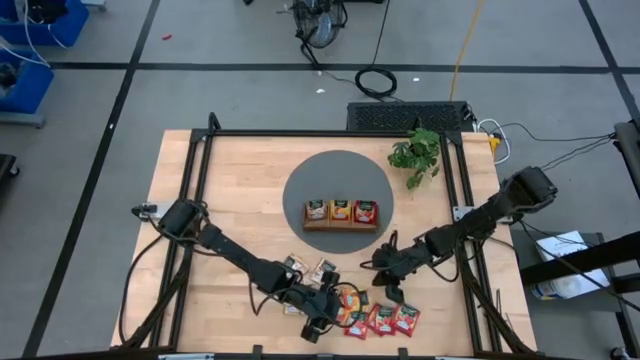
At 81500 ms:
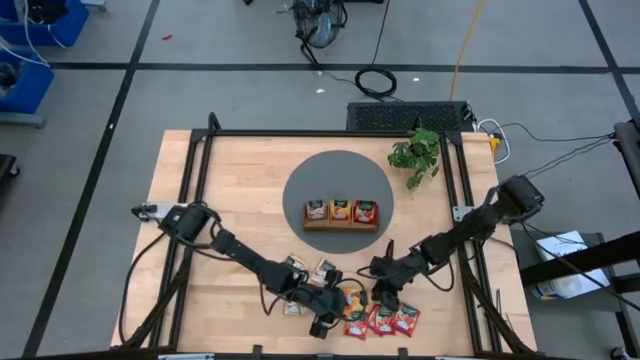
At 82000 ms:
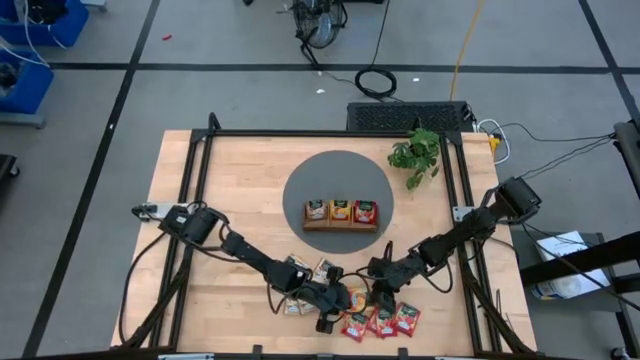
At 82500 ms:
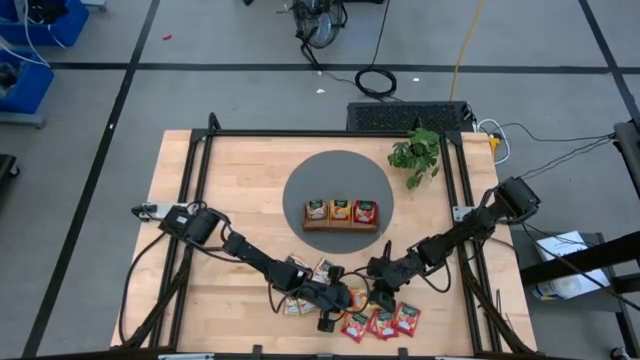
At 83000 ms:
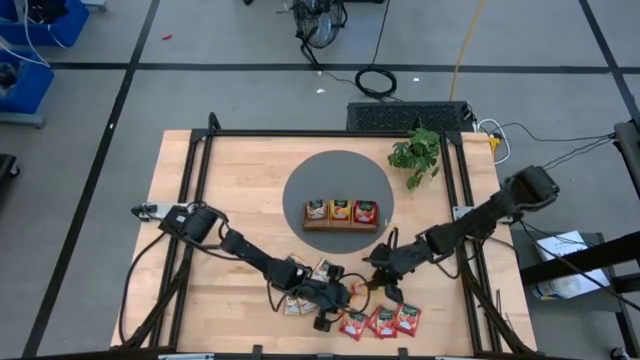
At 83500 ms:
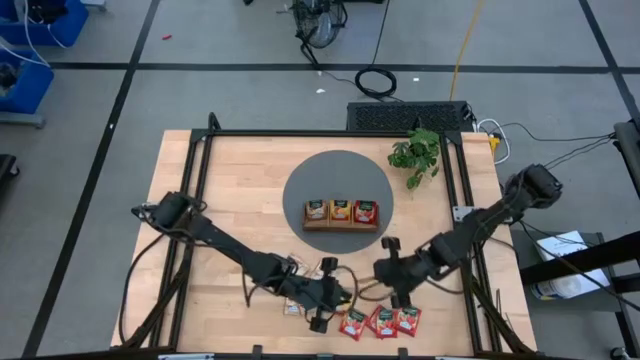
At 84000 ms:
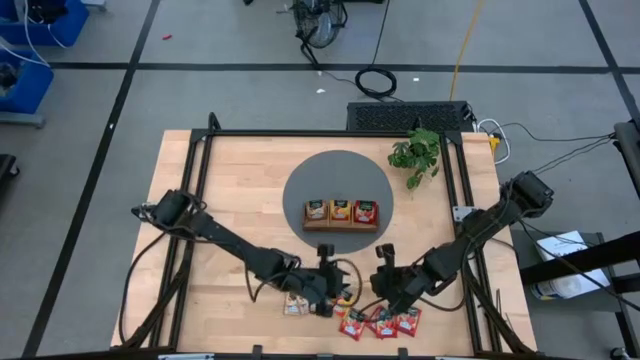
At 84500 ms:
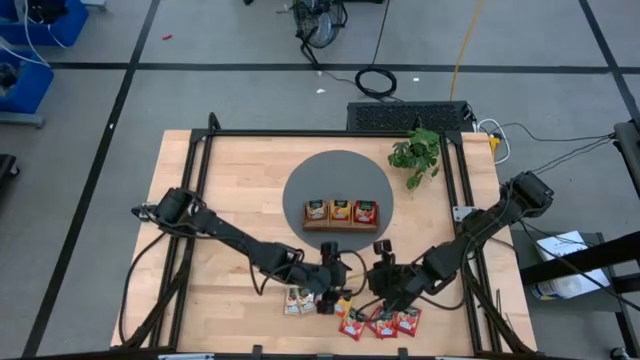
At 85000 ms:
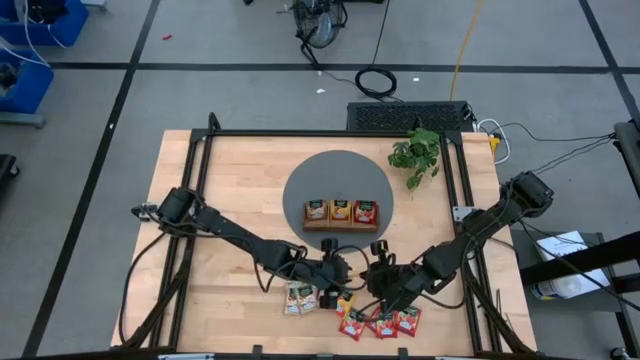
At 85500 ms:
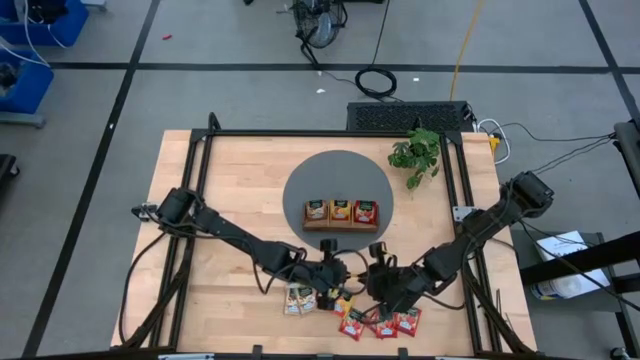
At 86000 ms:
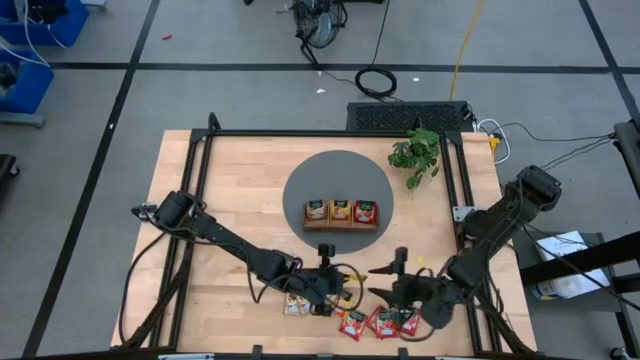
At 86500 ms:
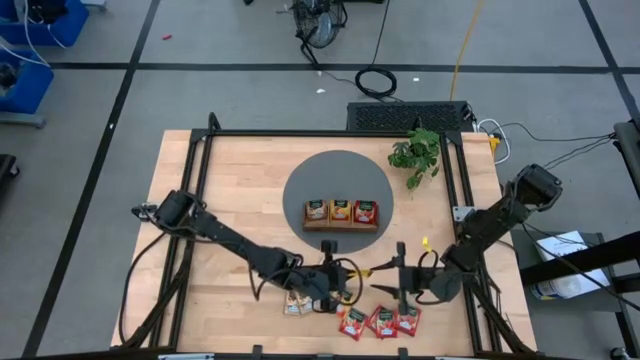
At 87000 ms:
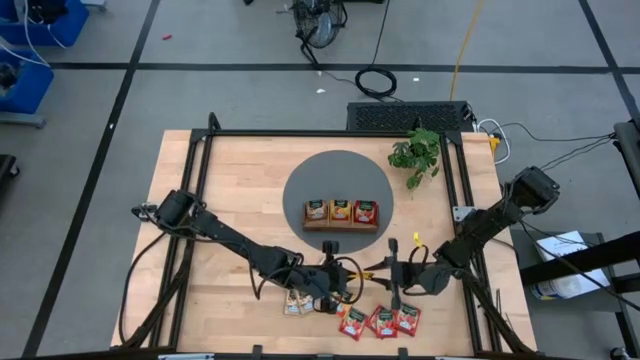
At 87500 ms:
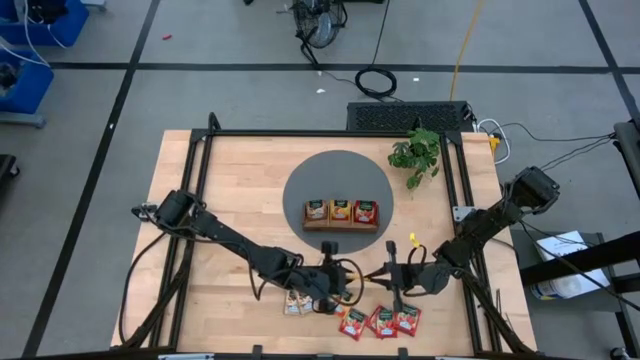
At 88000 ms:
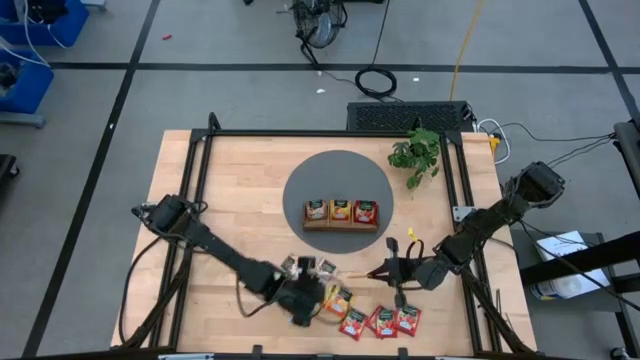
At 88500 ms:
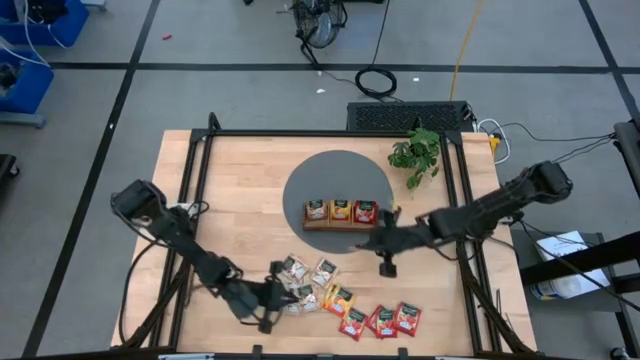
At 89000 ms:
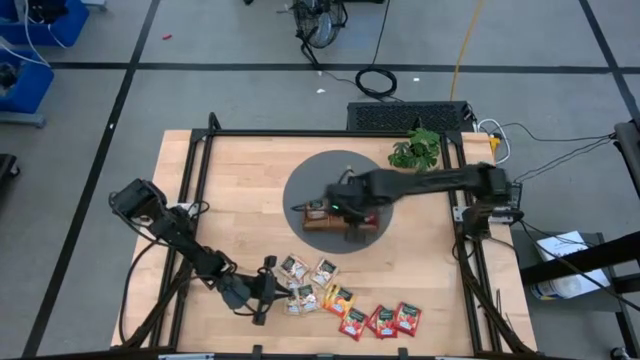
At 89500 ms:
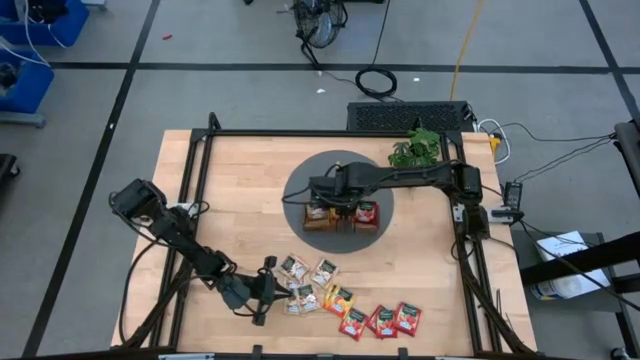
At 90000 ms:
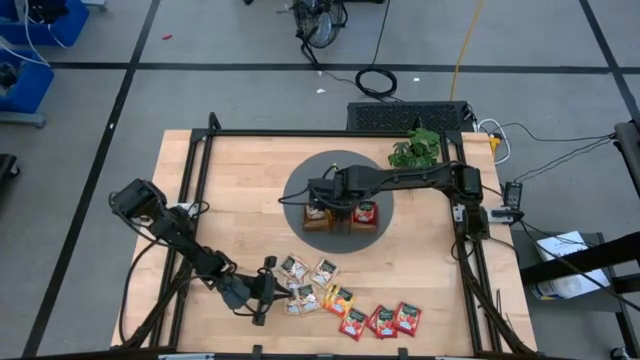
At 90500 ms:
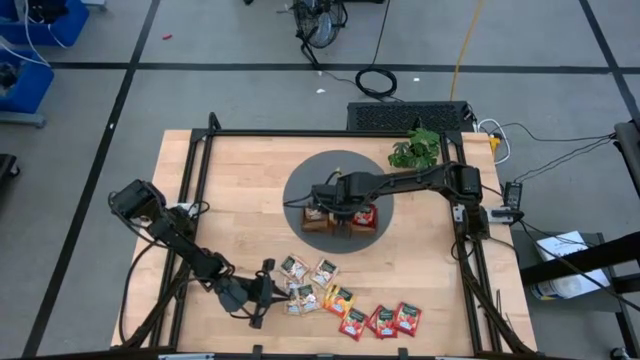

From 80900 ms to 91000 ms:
Task: Pick & Place Tea
Put the top orange tea bag into the middle slot of the wooden organizer

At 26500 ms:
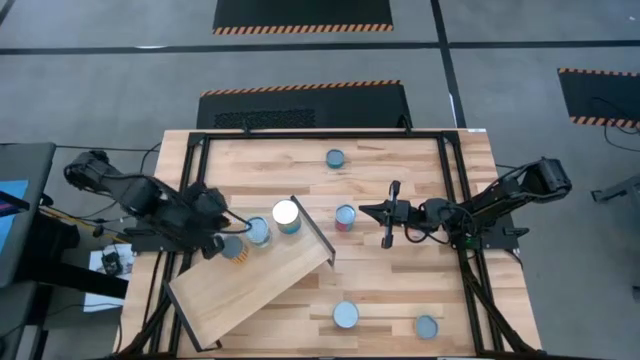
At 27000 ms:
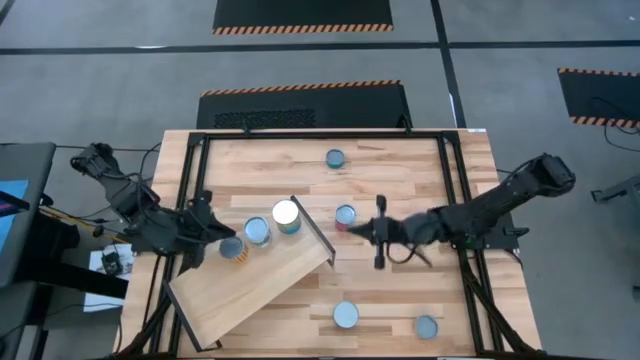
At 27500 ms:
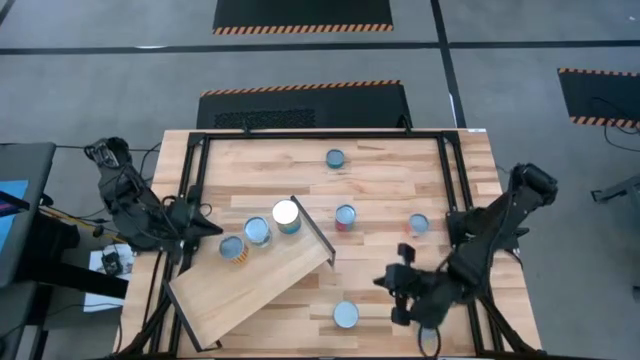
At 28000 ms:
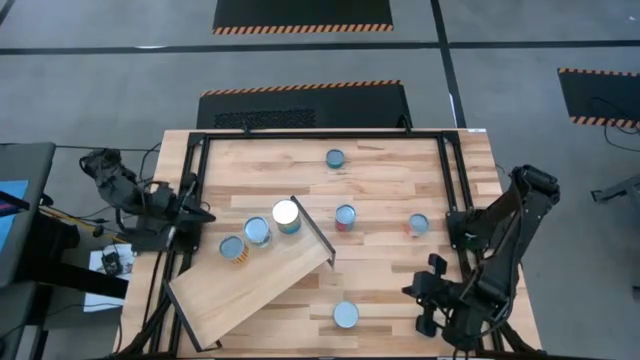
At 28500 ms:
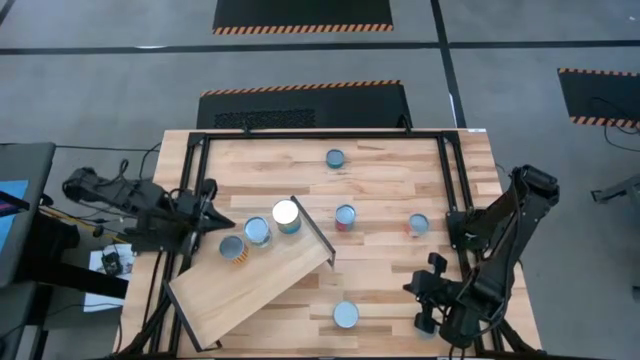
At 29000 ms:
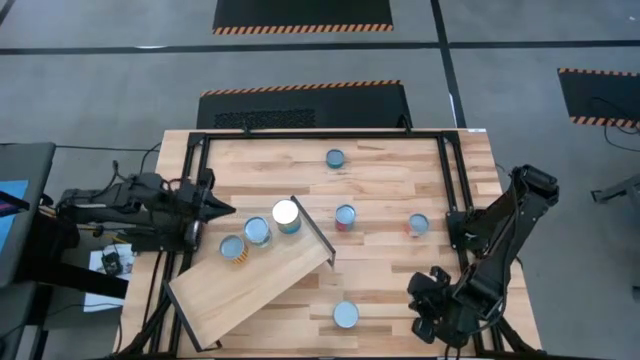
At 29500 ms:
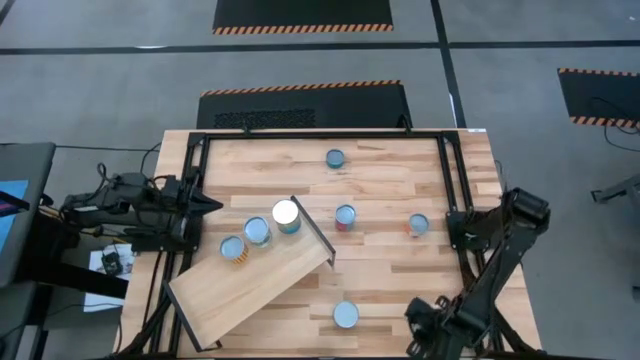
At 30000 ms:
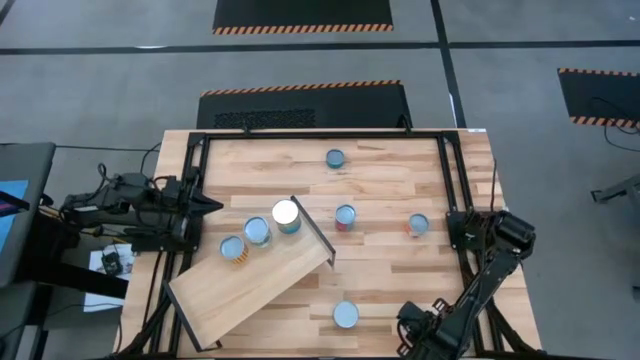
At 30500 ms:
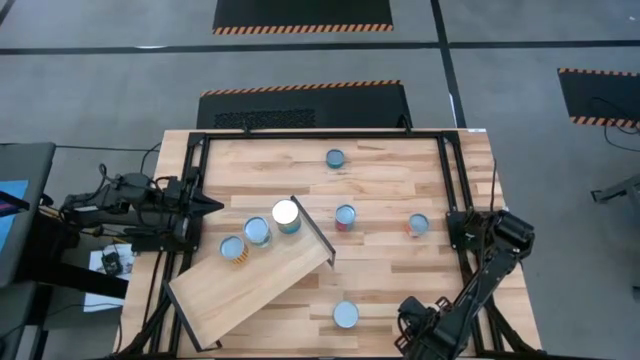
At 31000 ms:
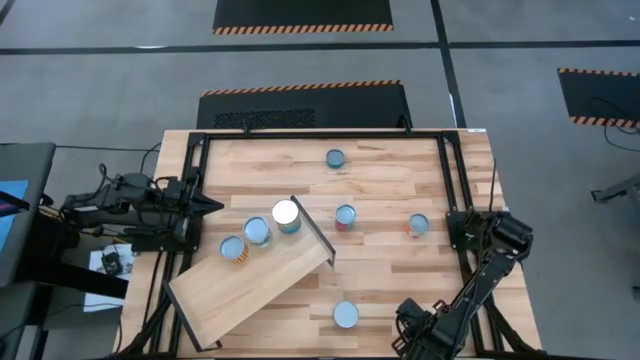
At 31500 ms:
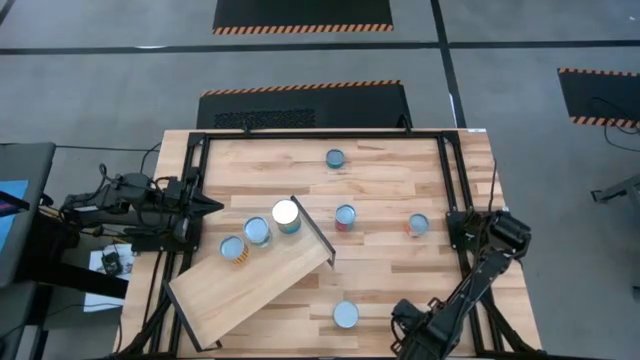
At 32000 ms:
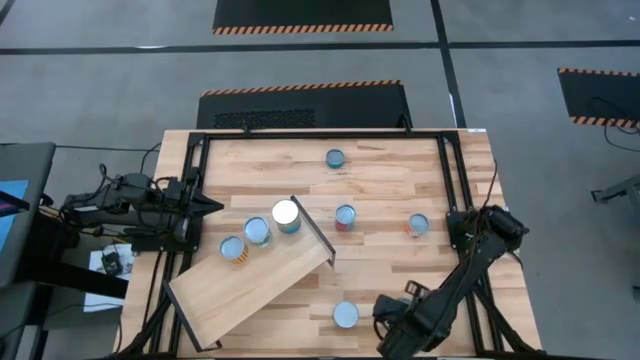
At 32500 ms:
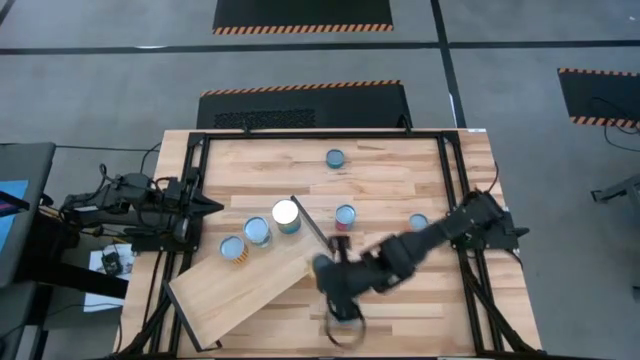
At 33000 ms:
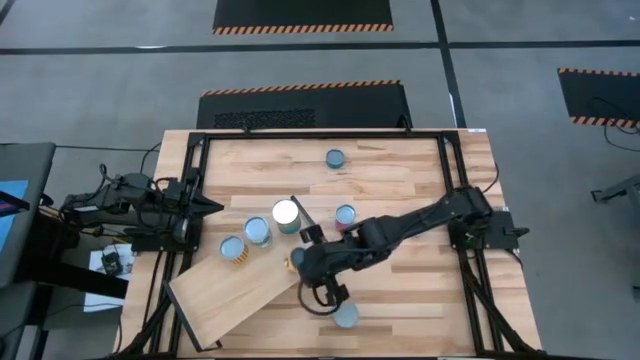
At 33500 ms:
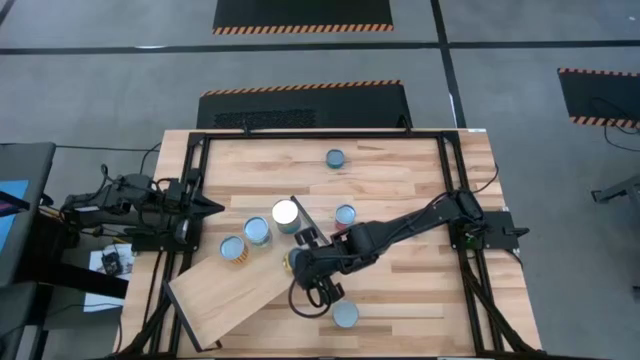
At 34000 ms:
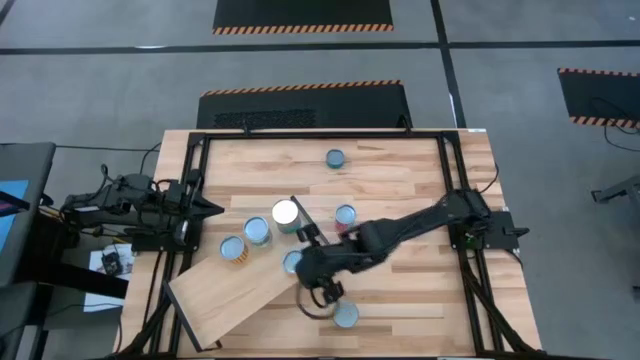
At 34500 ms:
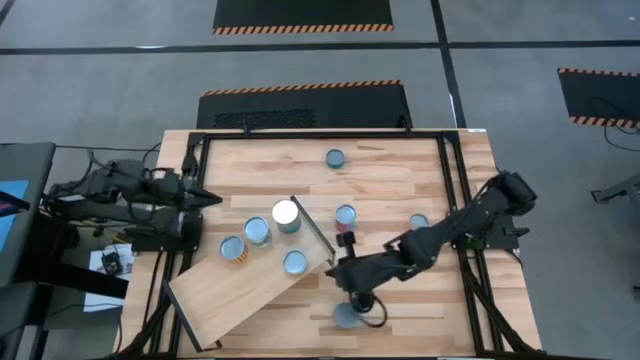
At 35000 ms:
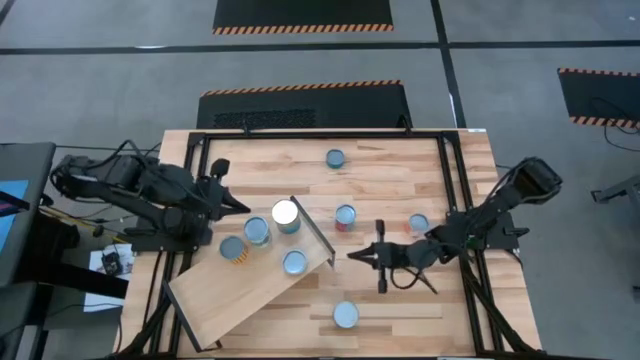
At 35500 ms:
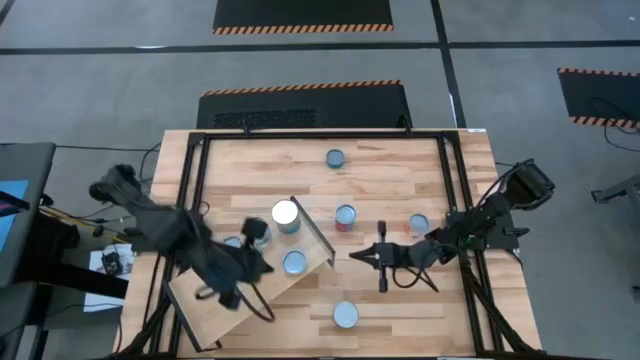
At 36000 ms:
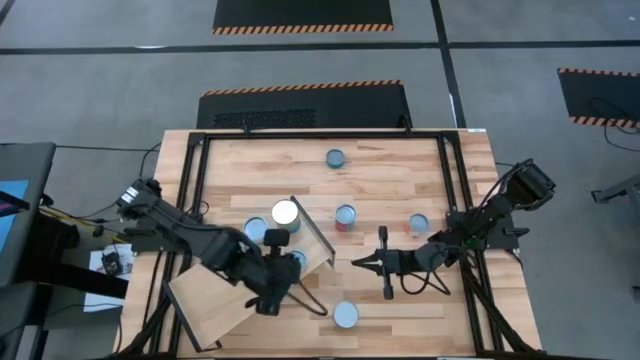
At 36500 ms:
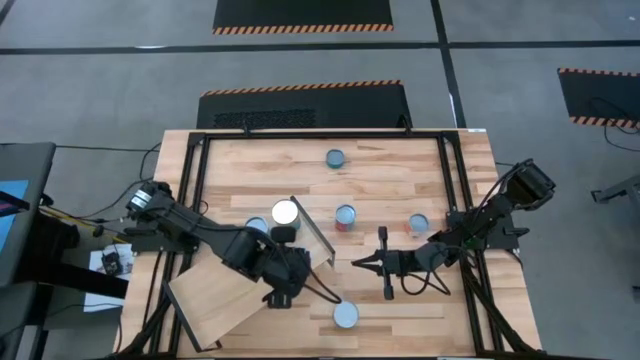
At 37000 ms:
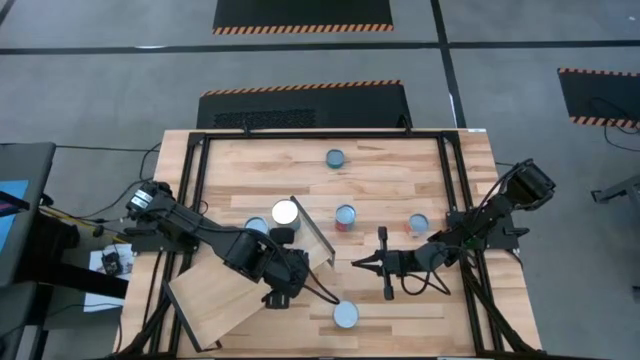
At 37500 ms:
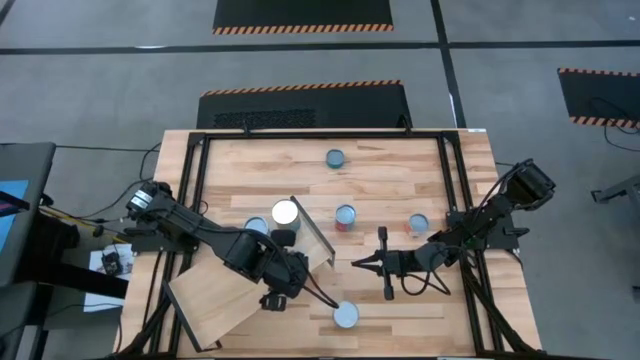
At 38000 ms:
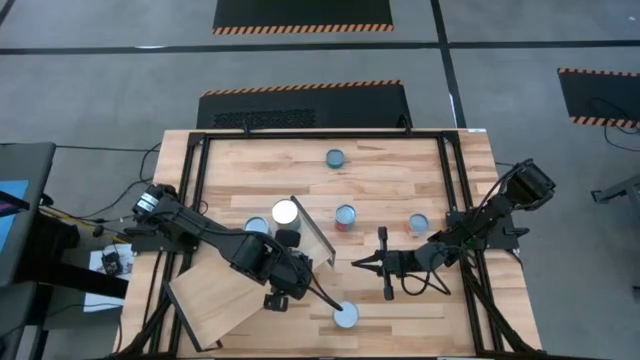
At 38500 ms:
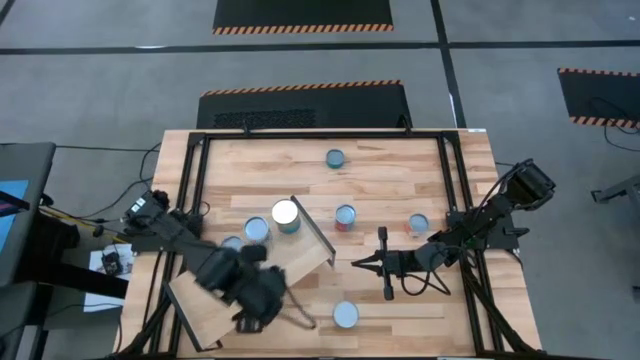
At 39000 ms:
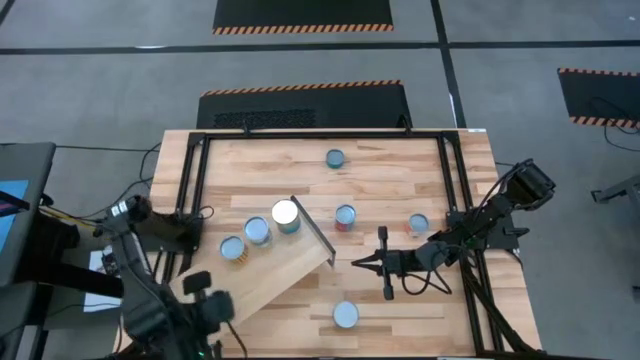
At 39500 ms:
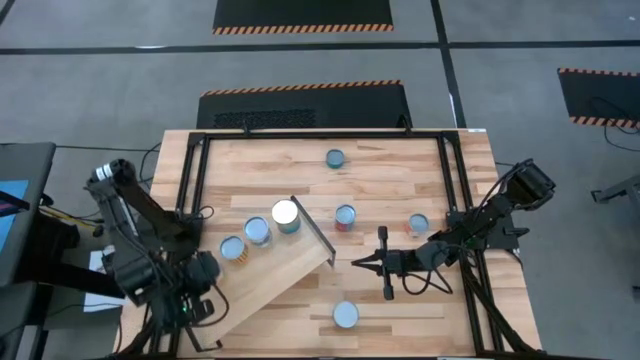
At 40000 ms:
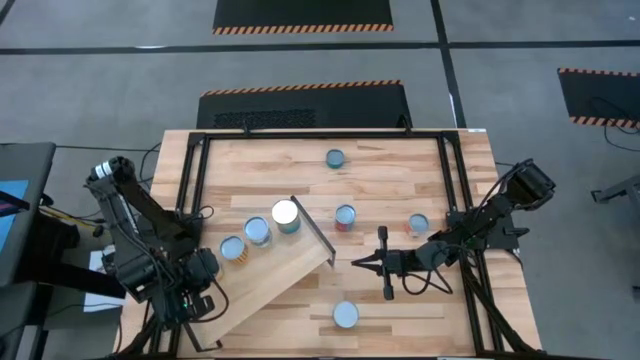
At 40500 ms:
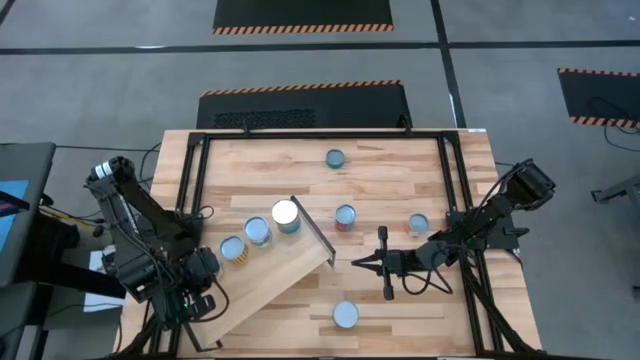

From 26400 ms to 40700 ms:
Task: Pick and place cans onto a shelf
Put the canned mushrooms on the shelf
